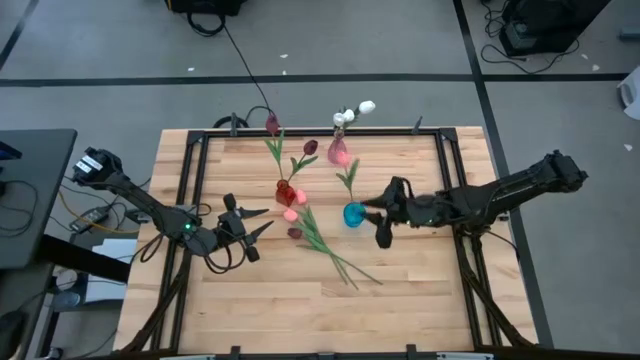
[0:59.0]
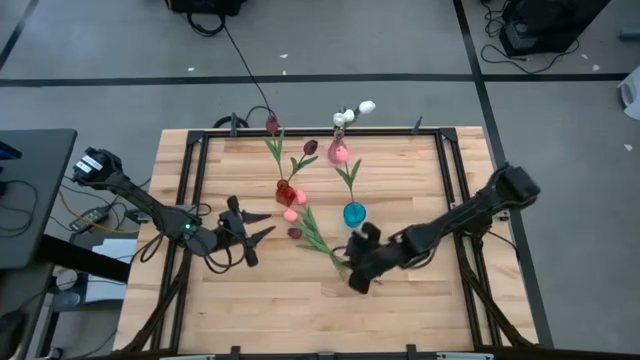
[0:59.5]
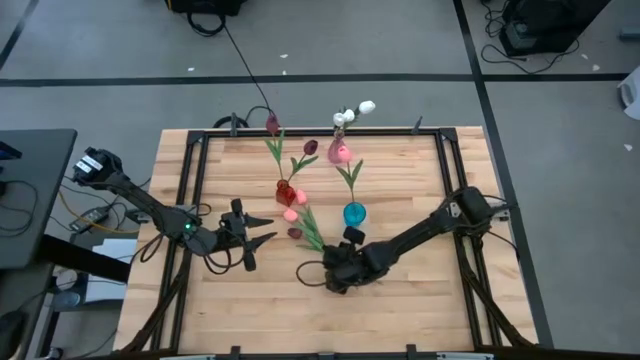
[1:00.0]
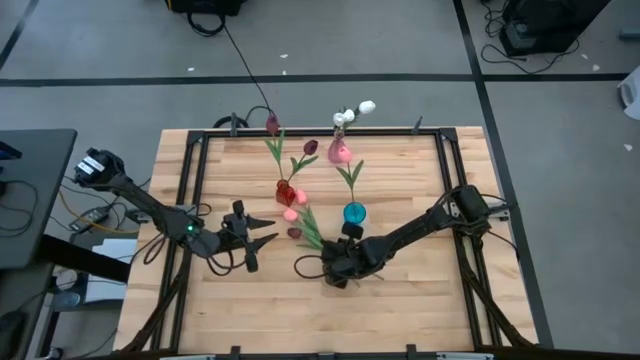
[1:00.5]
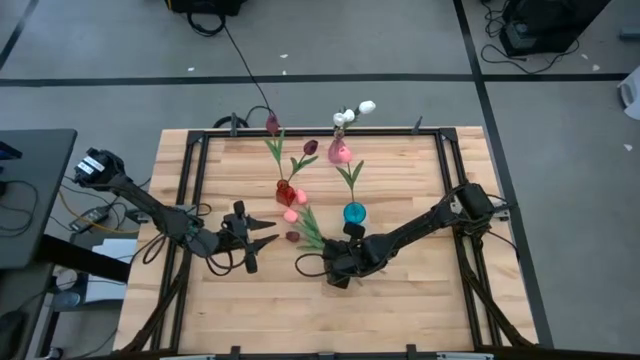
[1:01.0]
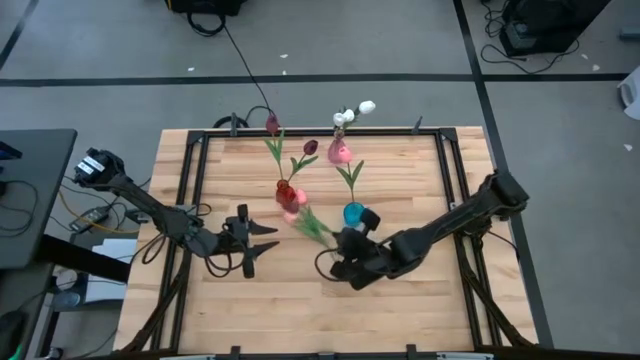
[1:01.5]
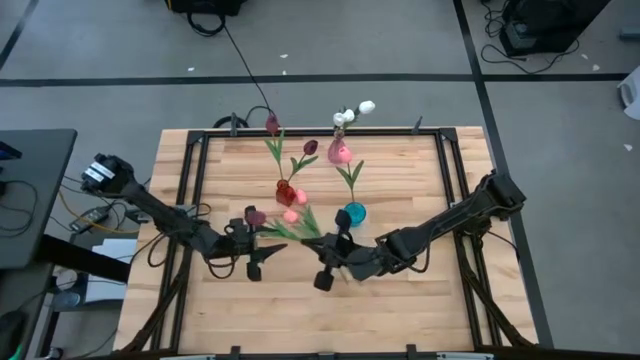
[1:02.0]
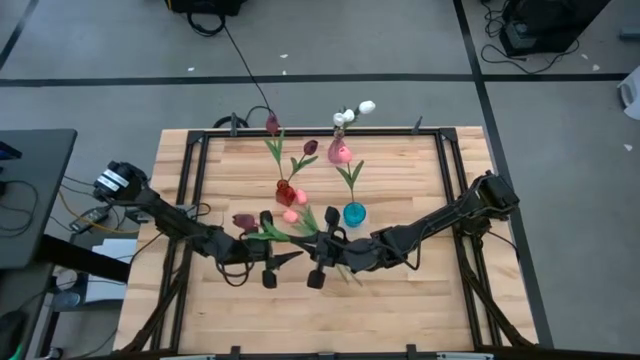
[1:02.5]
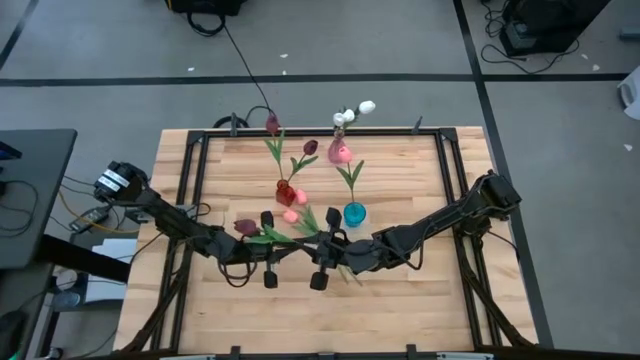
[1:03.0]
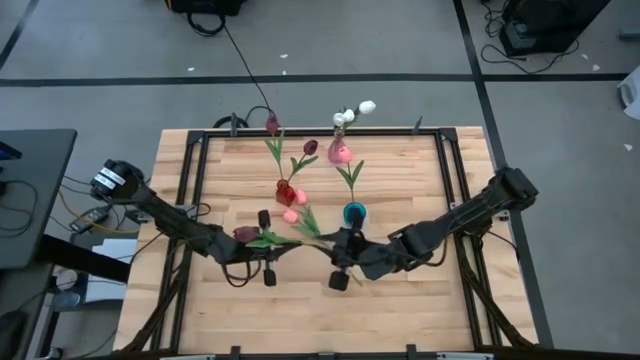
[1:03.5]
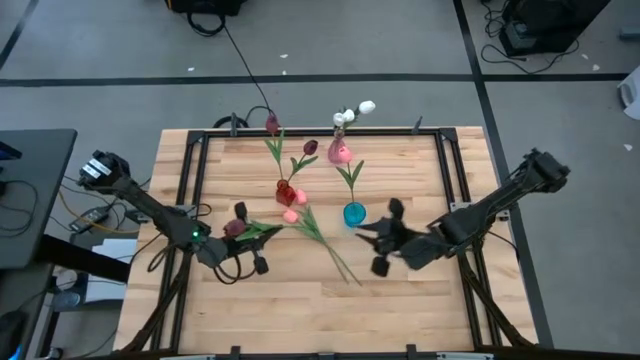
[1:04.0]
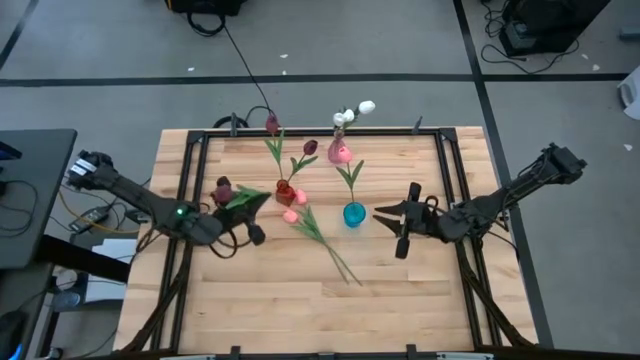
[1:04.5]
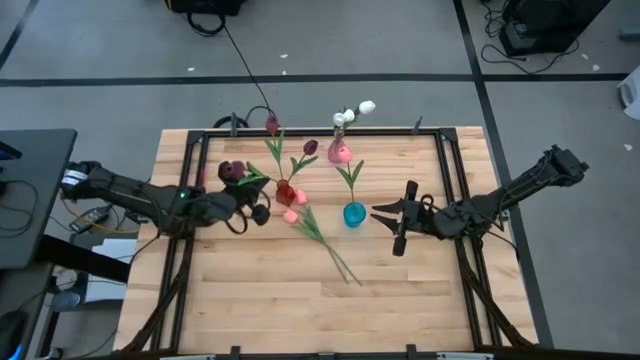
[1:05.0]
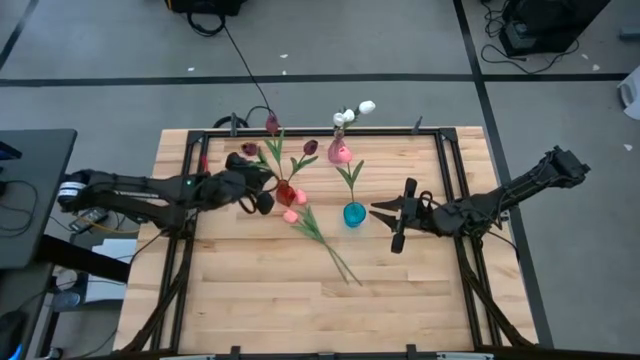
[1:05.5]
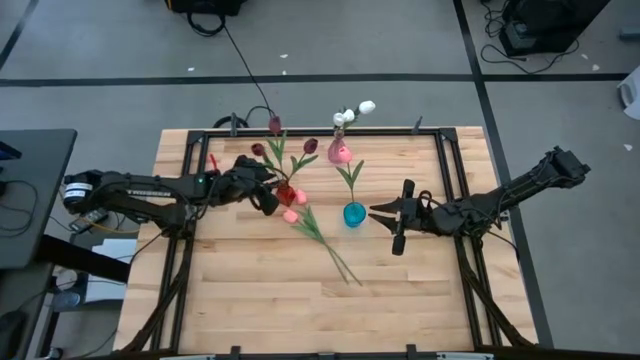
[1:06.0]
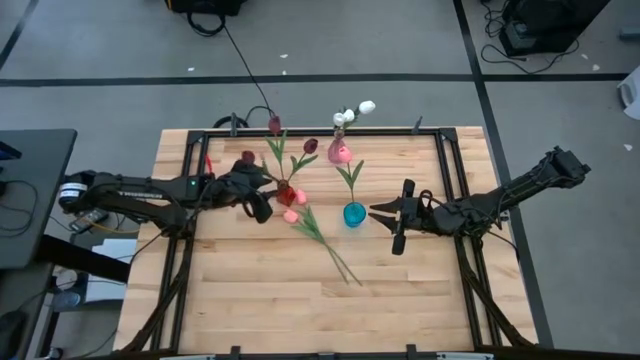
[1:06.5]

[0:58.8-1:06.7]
Task: Sort flowers into vase by color
Put the red tulip into the red vase

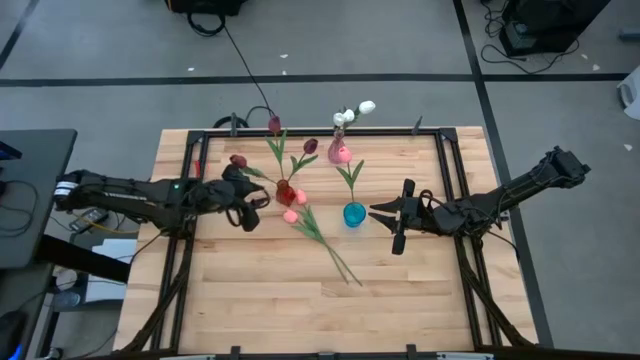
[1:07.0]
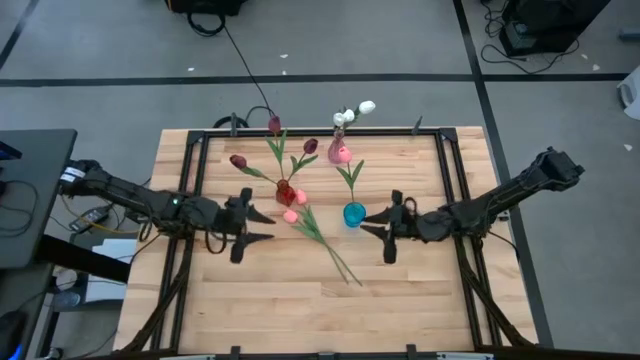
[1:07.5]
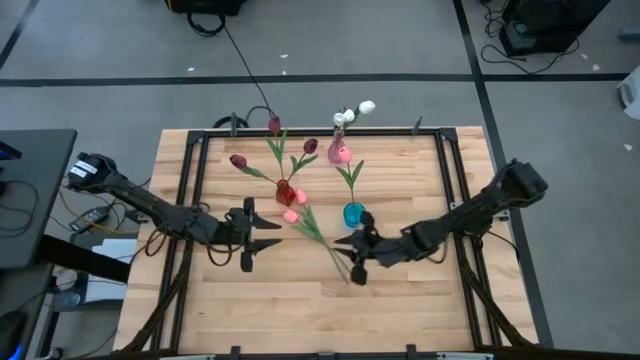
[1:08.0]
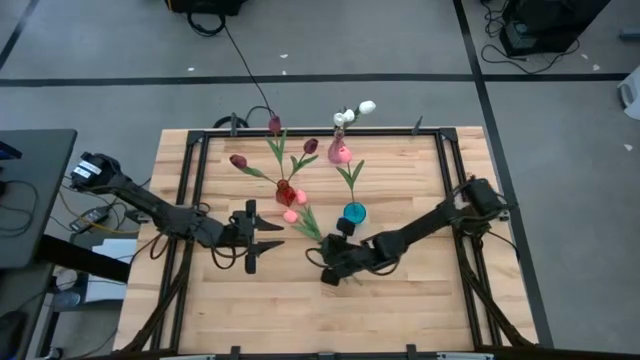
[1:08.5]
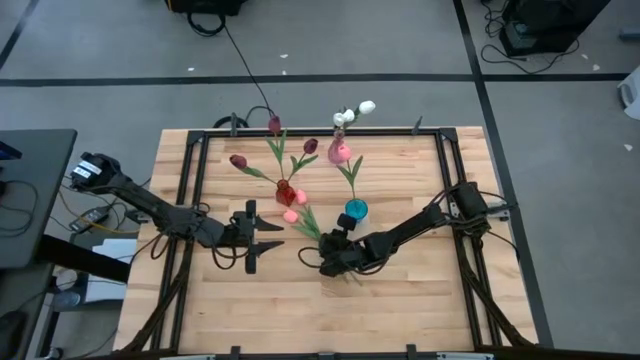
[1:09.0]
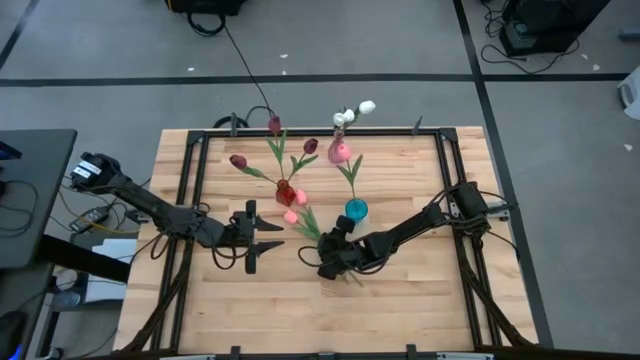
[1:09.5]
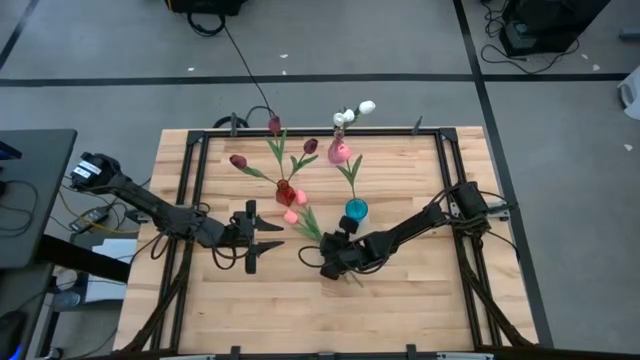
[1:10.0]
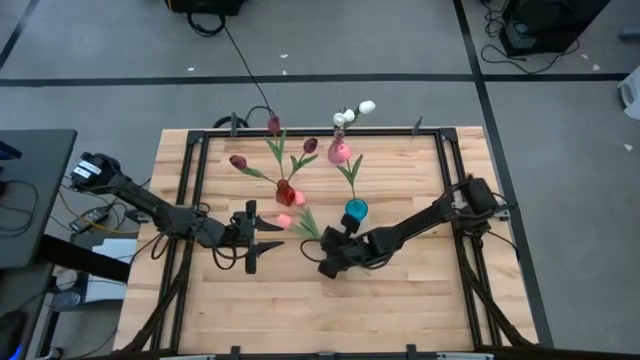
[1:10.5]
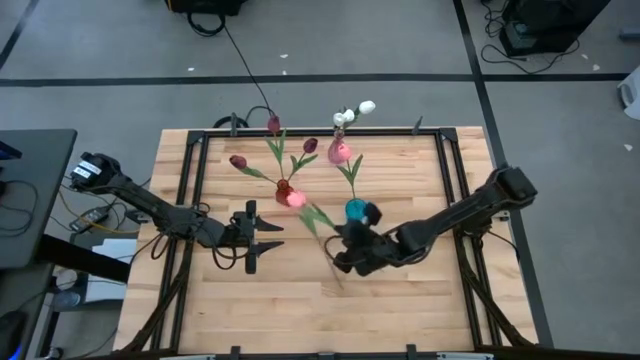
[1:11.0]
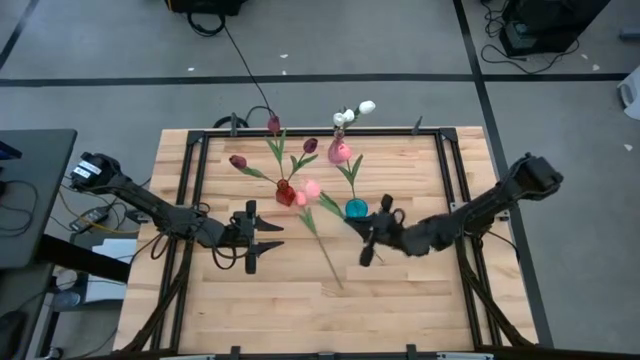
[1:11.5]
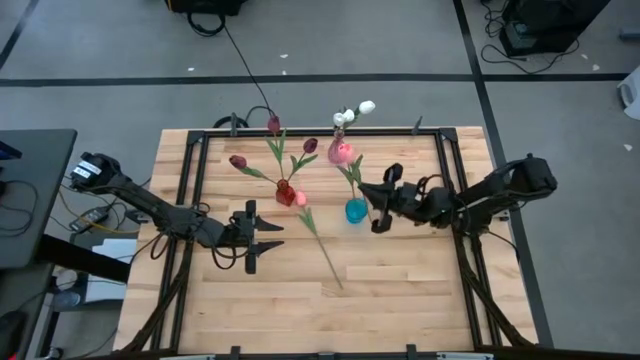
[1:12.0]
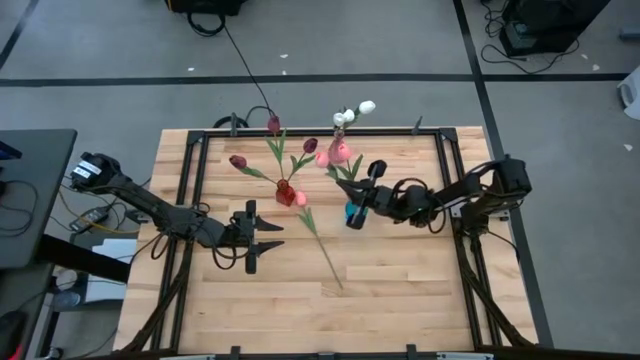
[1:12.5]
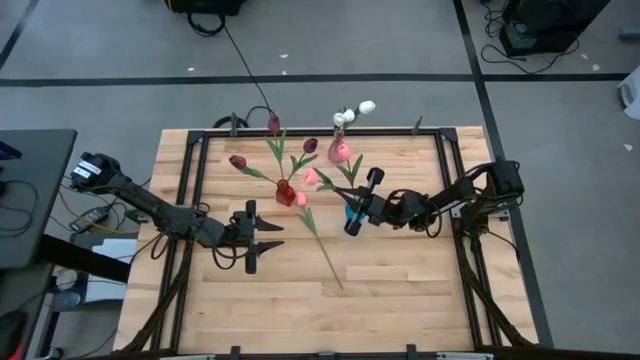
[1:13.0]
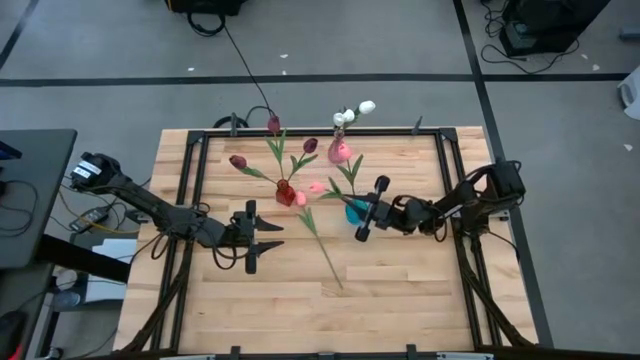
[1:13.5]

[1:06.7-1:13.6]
Put the pink tulip into the blue vase

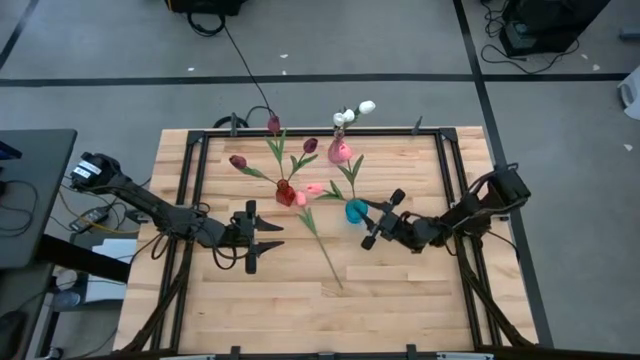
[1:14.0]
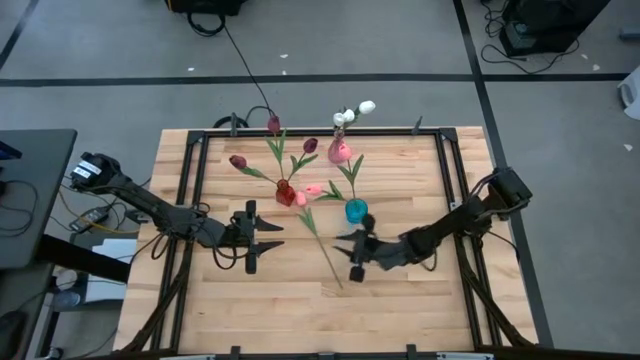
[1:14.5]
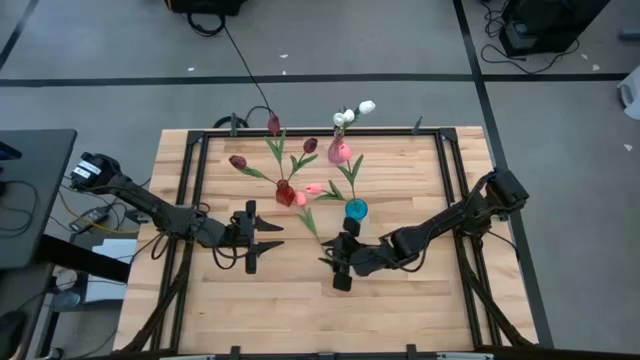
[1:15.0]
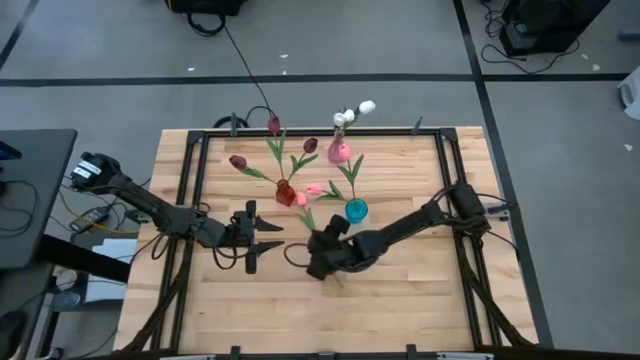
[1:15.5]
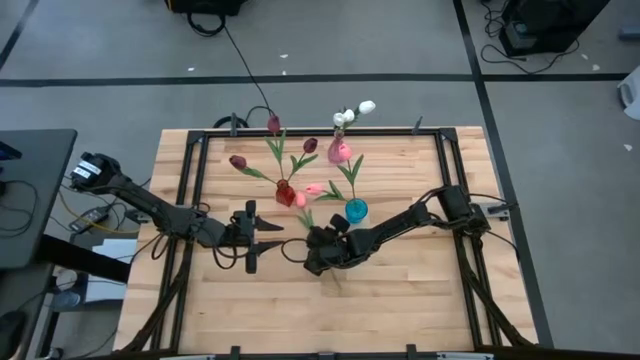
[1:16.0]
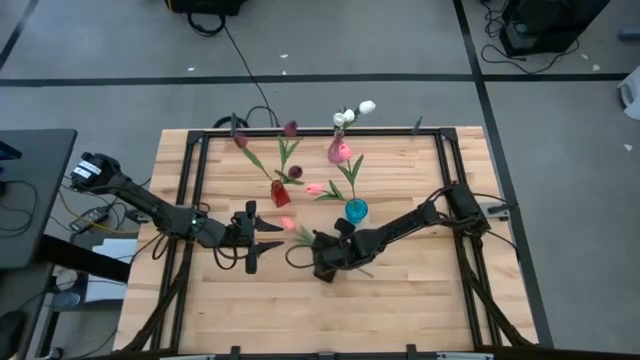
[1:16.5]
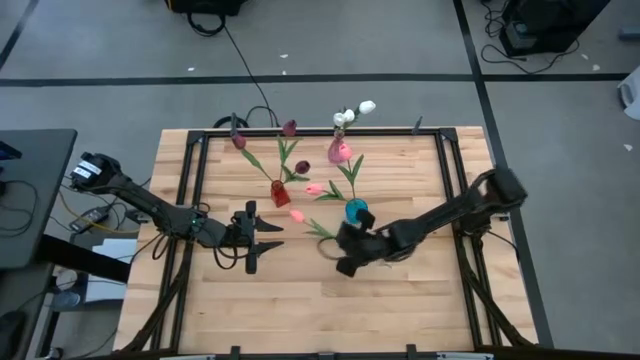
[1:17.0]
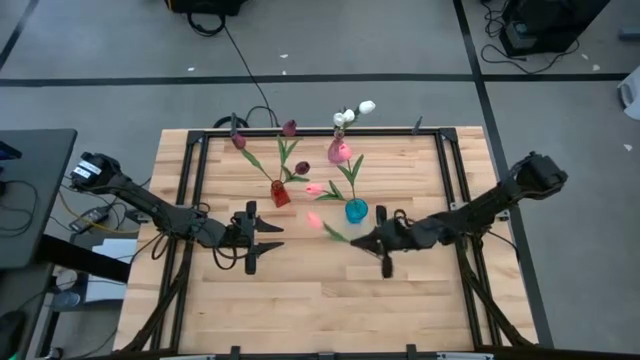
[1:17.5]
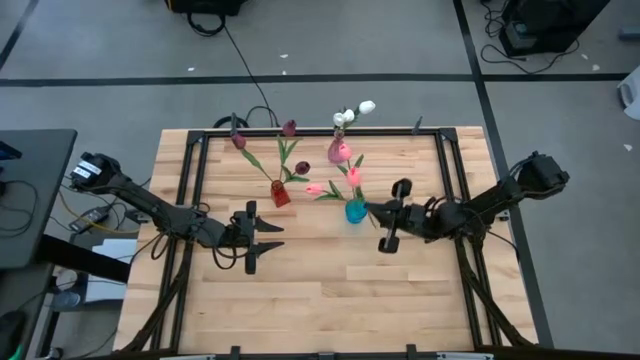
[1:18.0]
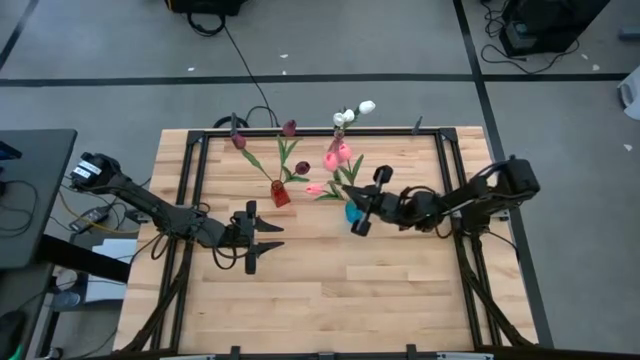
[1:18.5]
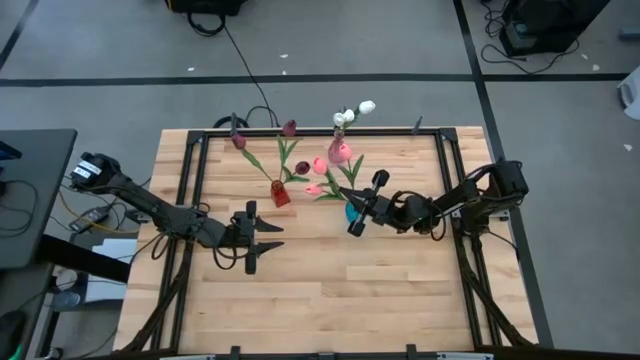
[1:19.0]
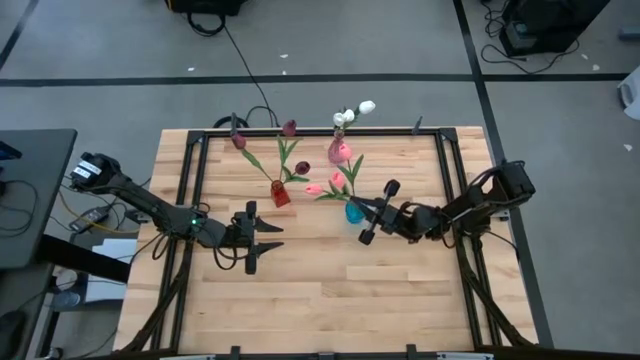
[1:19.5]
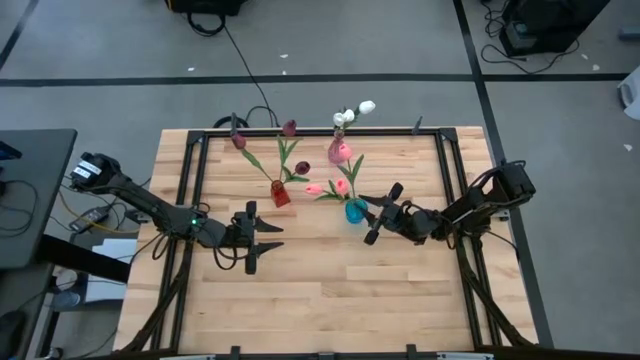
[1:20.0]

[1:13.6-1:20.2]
Put the pink tulip into the blue vase
